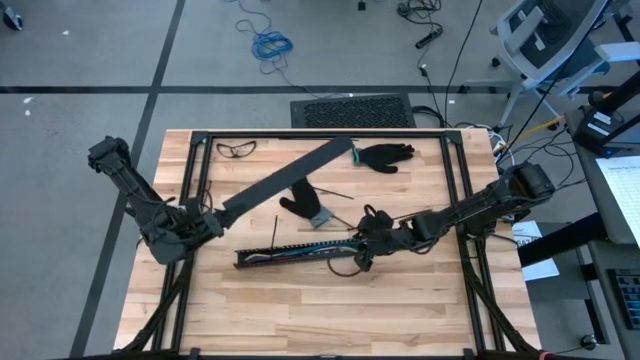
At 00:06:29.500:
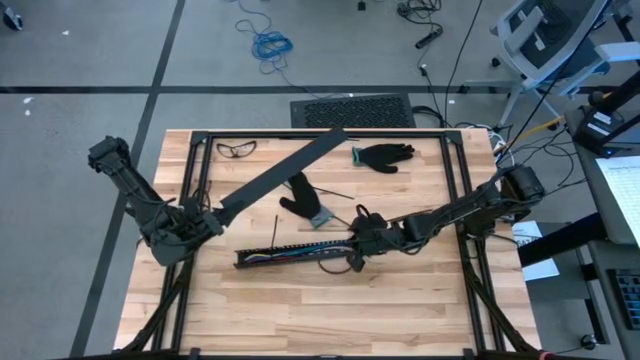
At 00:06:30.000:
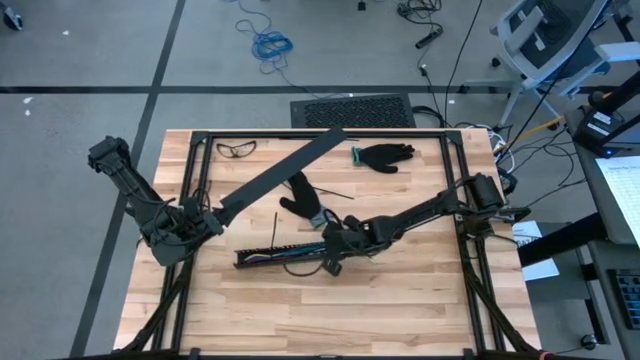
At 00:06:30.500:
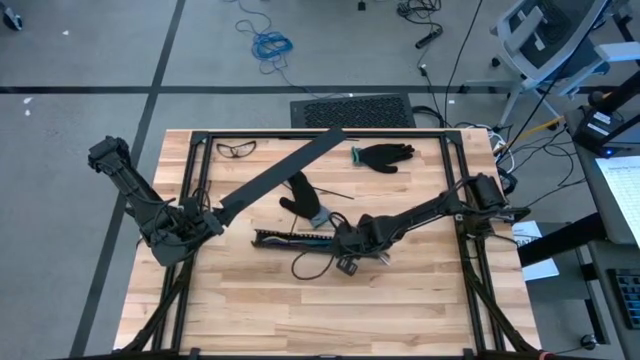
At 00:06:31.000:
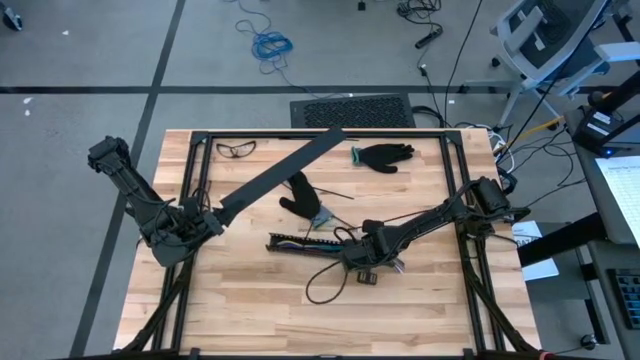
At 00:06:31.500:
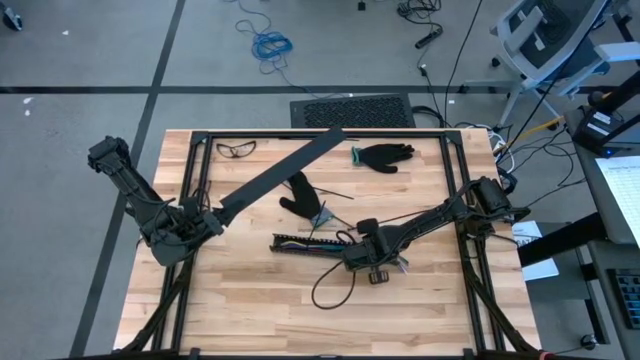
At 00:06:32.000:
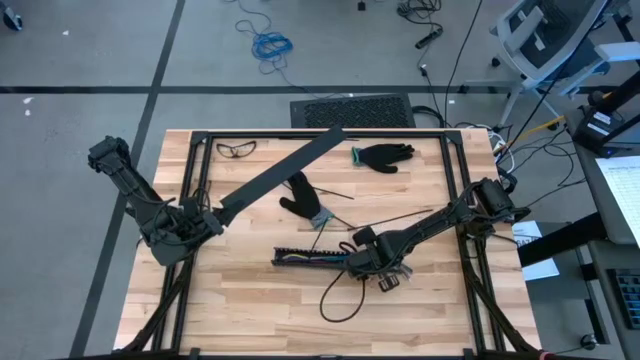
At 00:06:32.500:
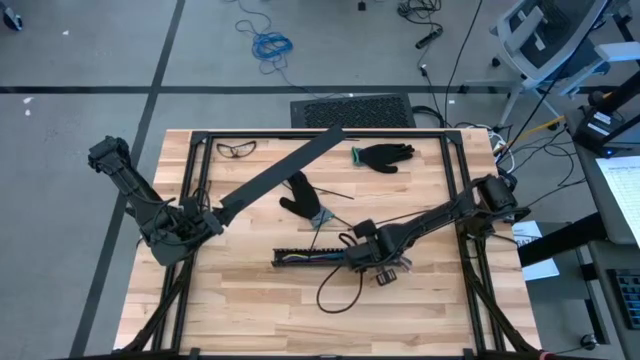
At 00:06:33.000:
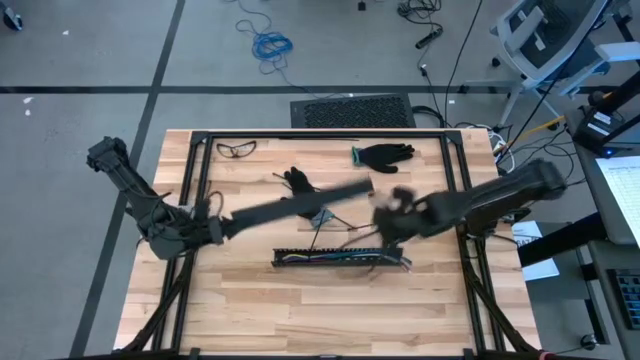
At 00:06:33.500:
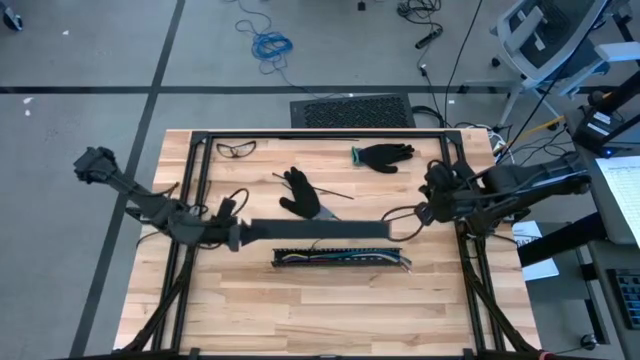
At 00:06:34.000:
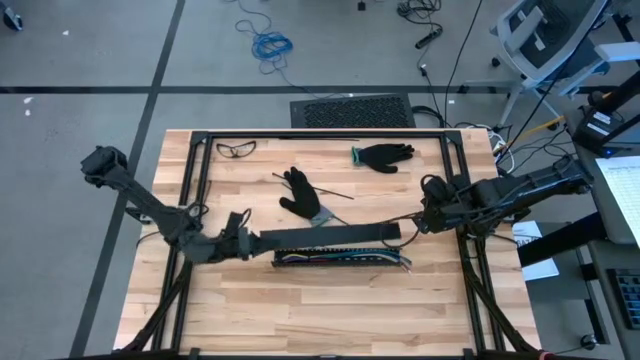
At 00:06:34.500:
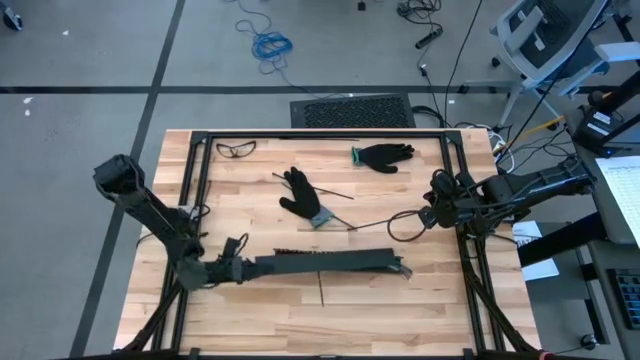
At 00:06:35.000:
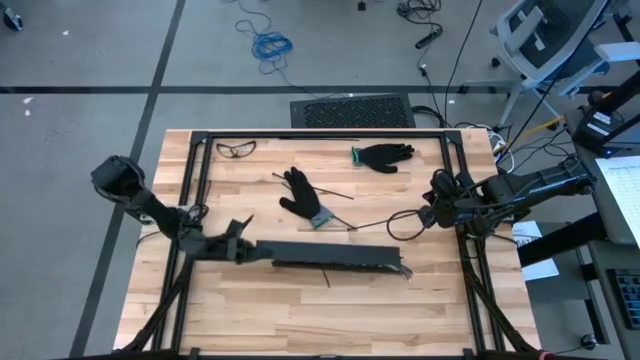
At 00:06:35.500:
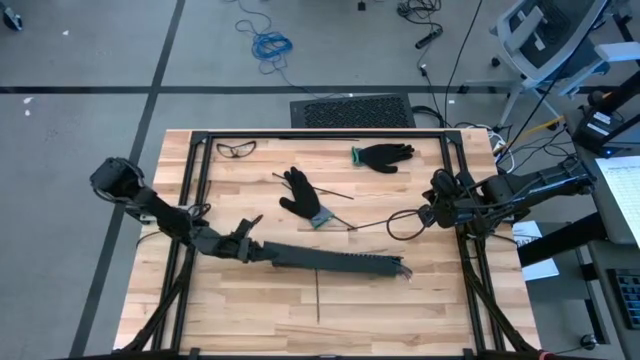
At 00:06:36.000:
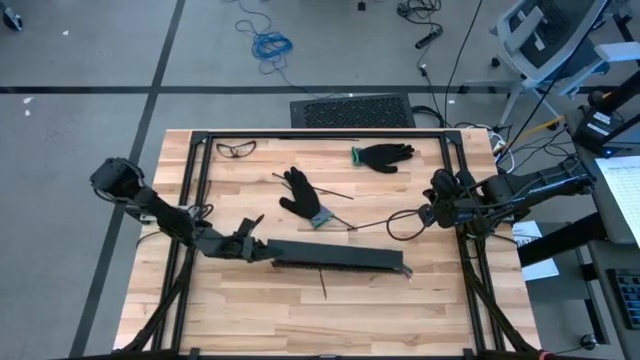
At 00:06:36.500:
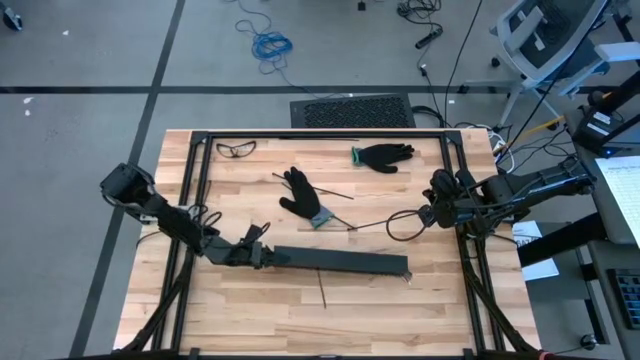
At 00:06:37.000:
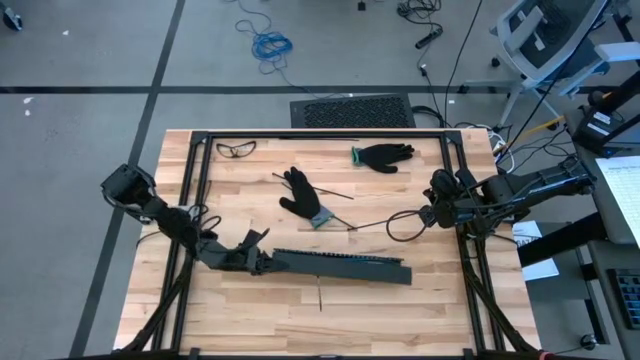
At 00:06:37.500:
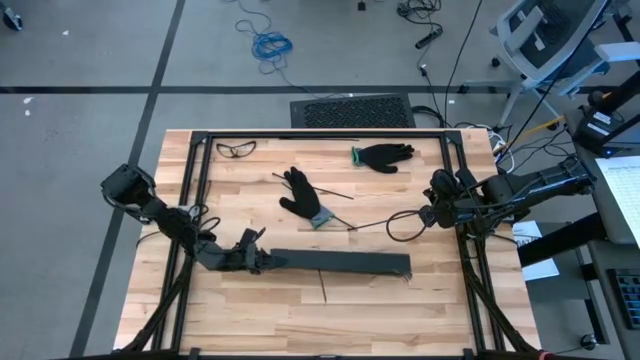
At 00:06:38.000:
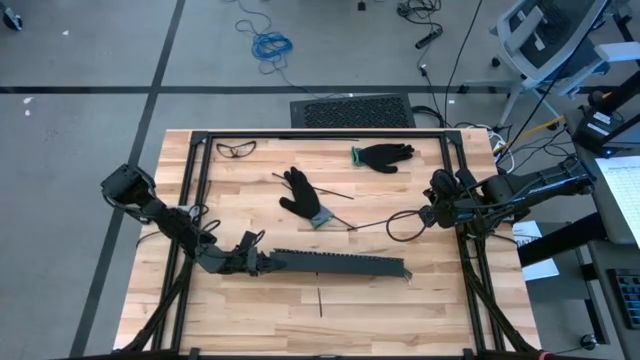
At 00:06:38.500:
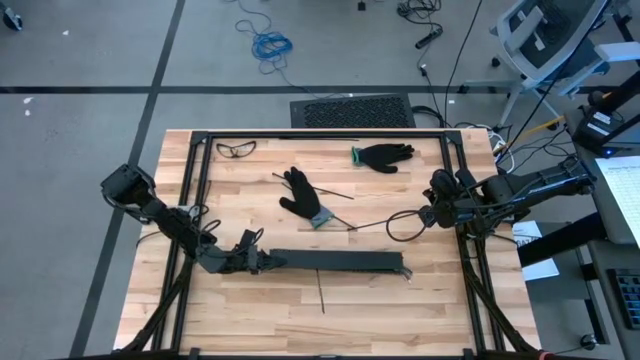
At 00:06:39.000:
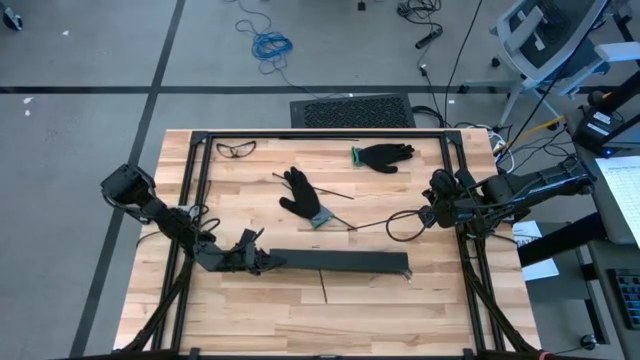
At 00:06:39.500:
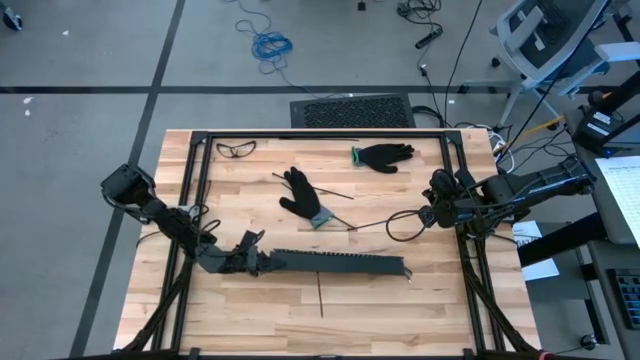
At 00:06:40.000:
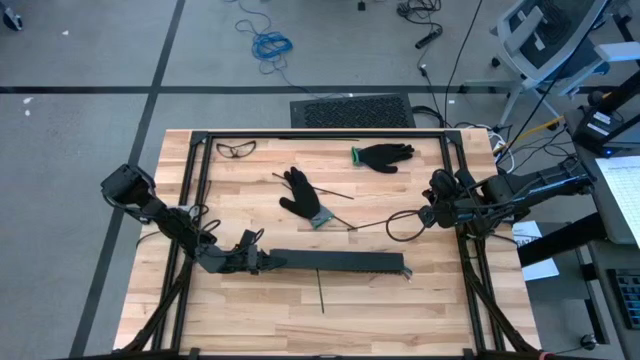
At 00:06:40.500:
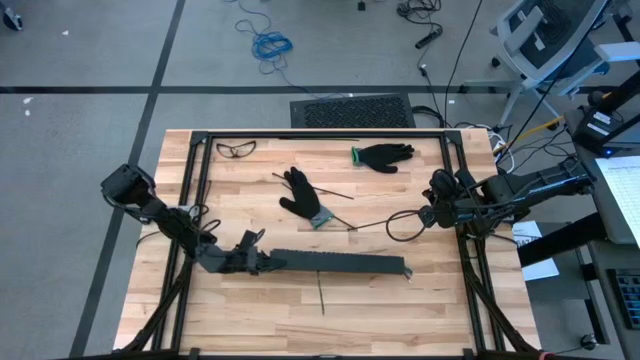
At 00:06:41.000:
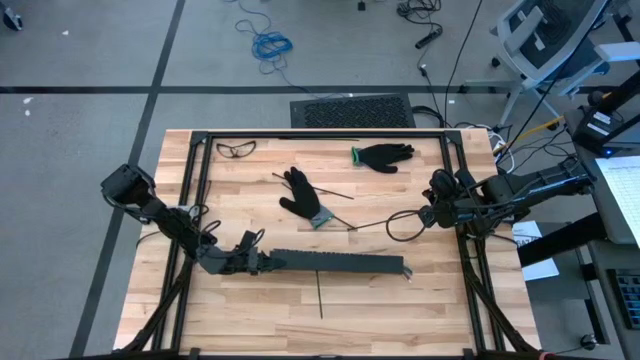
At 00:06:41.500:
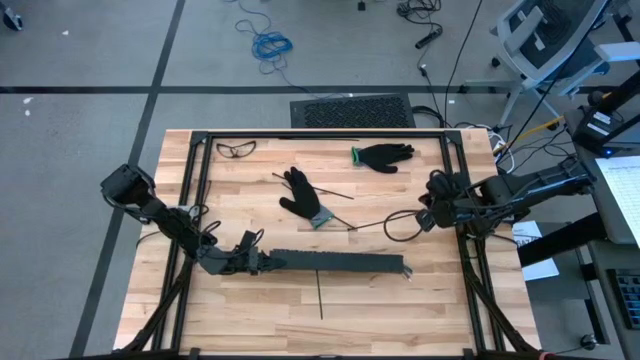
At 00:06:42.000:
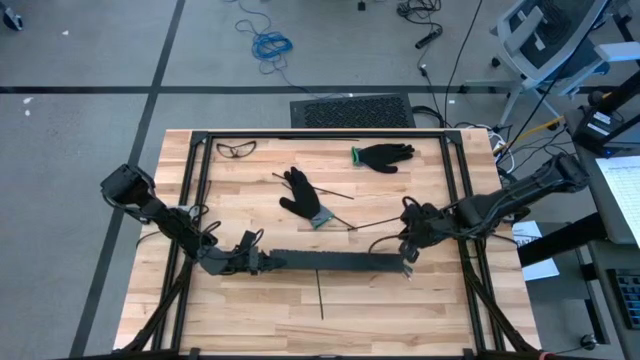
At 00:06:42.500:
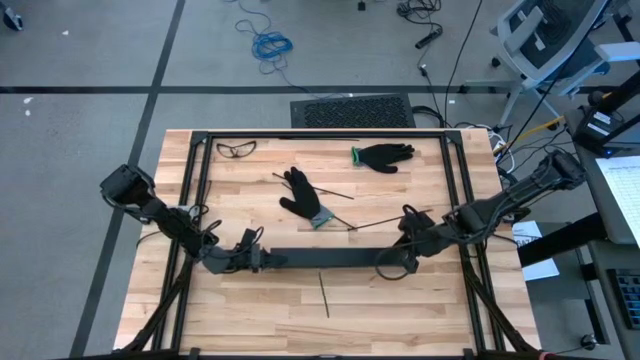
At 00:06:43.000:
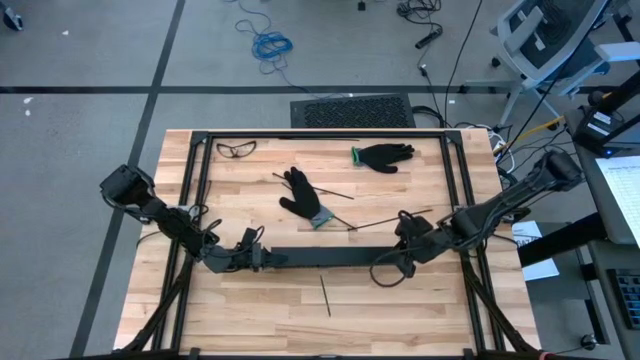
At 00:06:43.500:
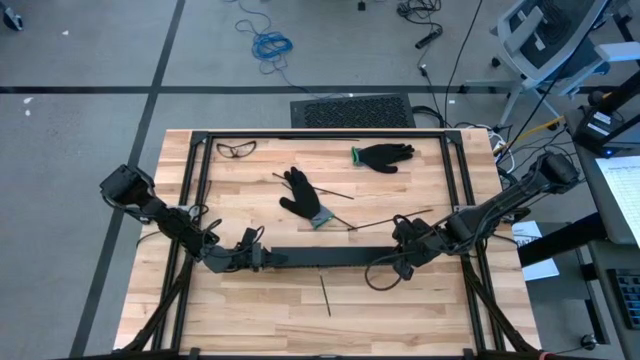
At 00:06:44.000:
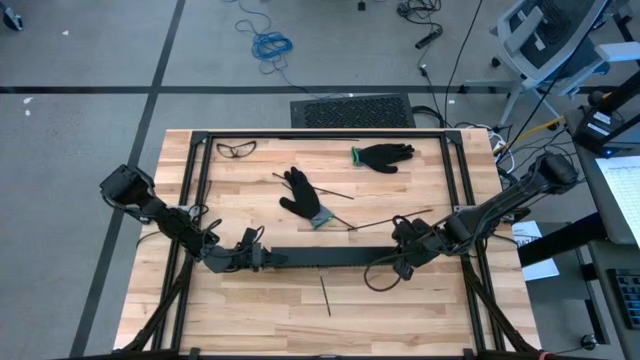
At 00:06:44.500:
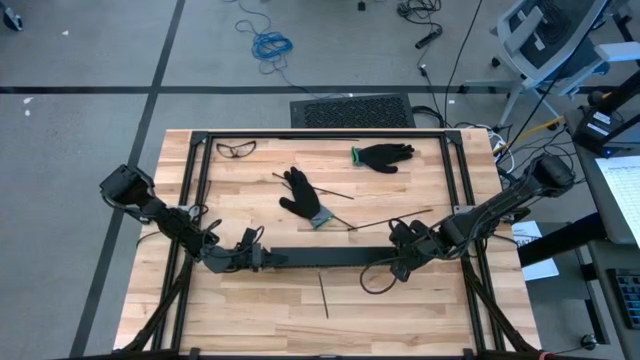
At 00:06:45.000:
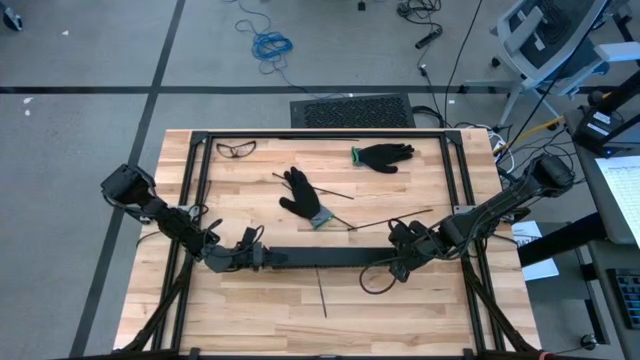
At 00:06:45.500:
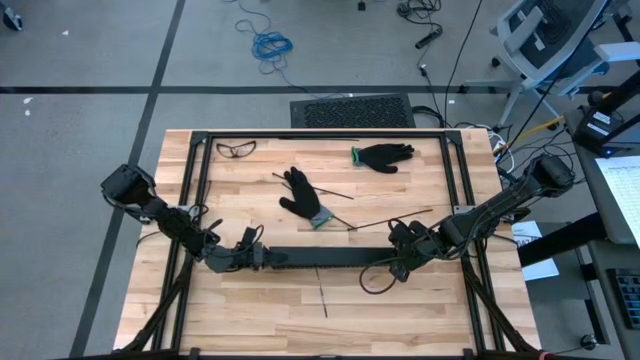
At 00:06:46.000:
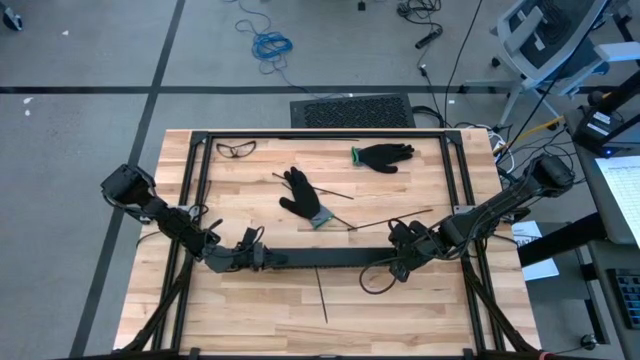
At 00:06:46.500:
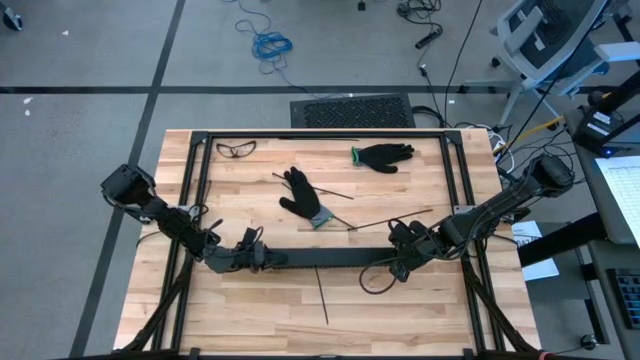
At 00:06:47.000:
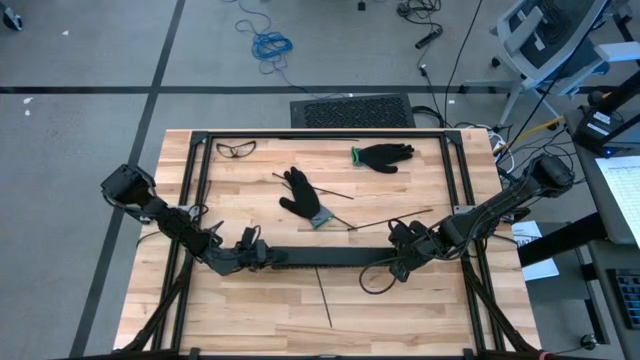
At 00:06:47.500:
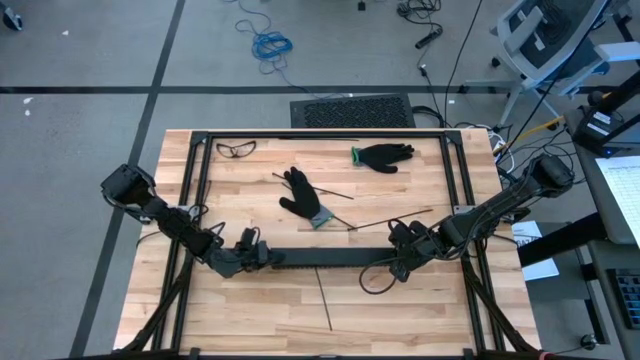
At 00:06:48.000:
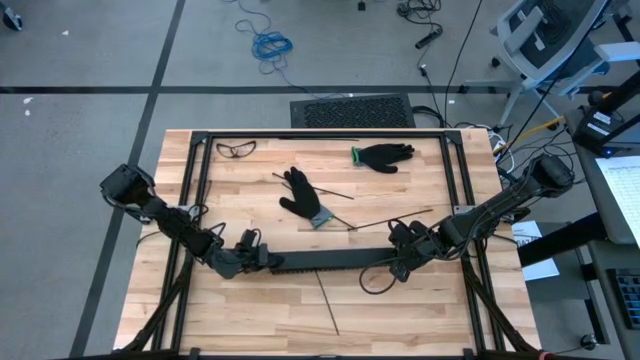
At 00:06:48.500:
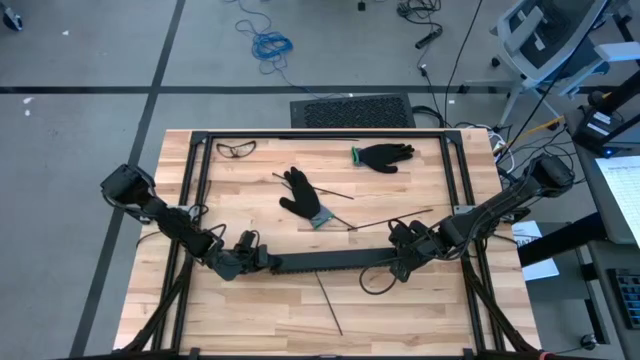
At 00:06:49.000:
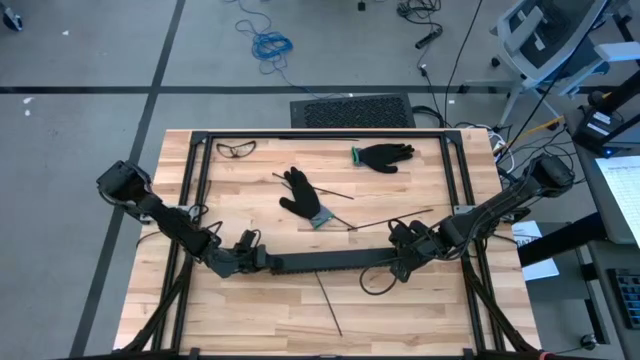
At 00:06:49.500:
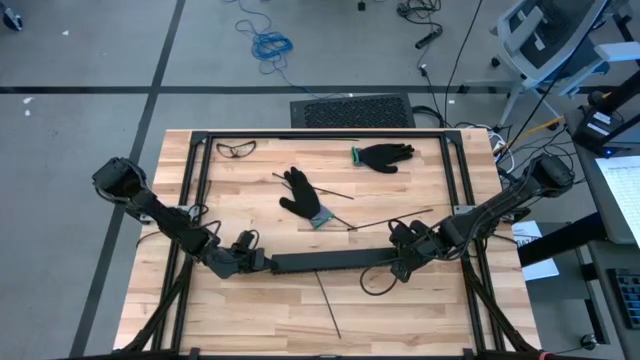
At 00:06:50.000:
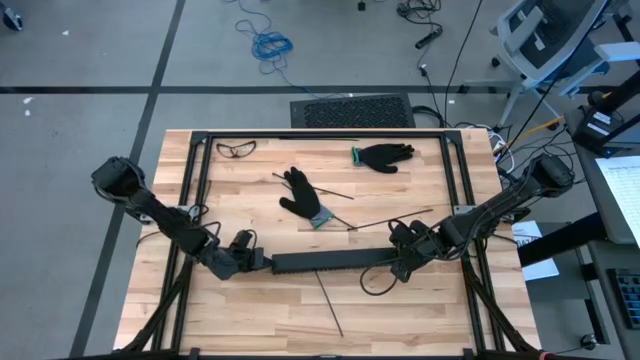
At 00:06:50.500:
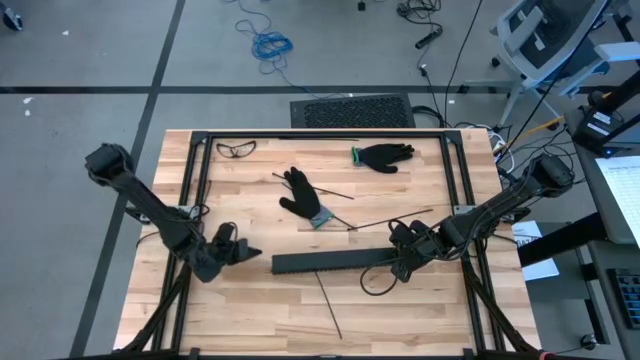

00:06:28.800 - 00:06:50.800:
Task: Ziptie cables
Insert the black cover of the black cable duct
